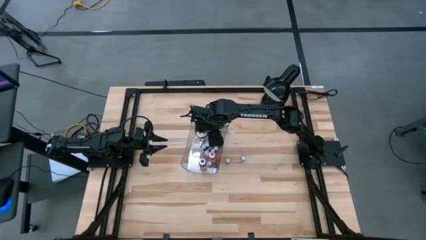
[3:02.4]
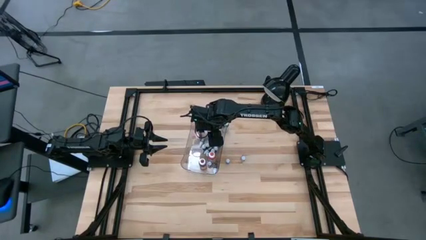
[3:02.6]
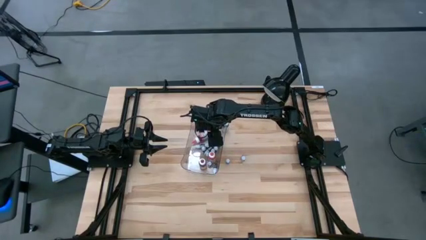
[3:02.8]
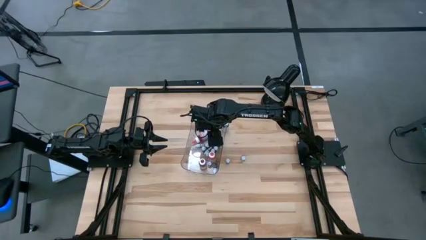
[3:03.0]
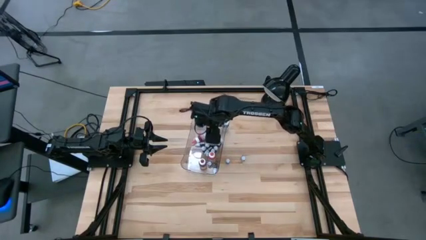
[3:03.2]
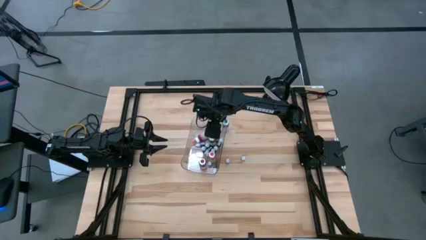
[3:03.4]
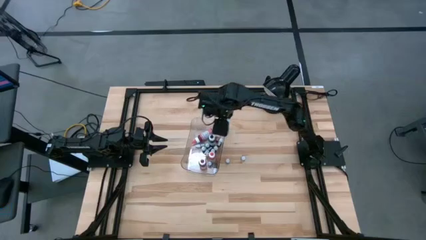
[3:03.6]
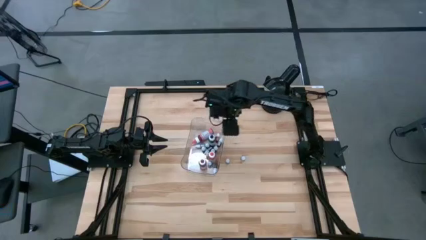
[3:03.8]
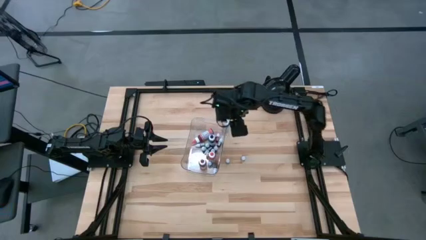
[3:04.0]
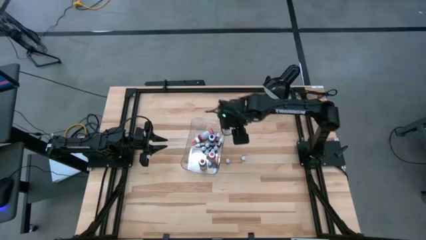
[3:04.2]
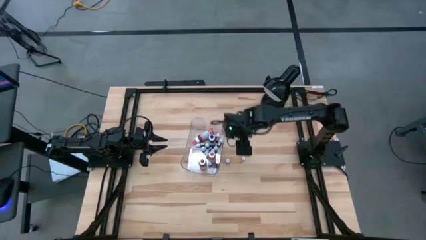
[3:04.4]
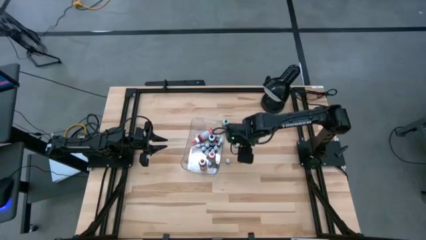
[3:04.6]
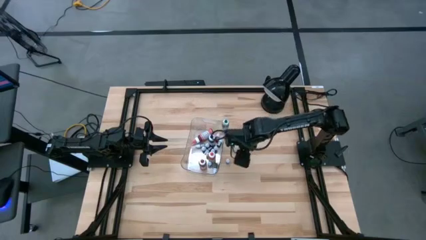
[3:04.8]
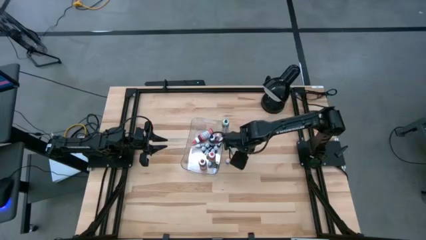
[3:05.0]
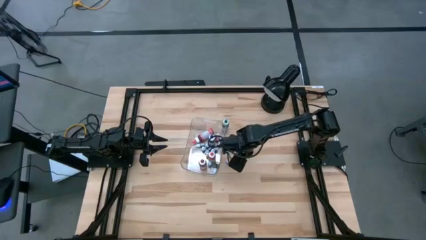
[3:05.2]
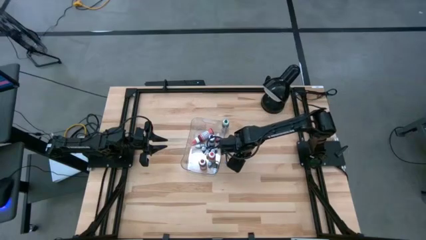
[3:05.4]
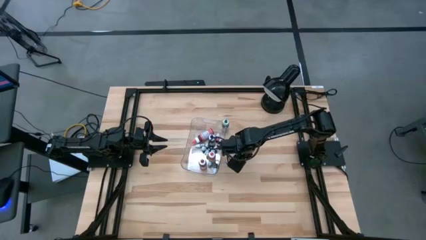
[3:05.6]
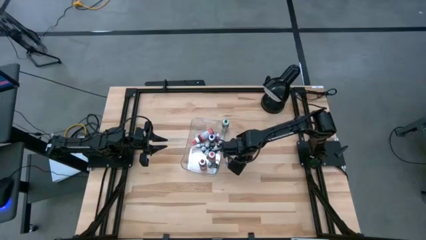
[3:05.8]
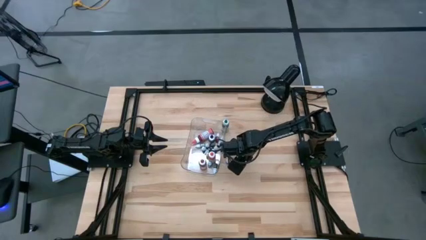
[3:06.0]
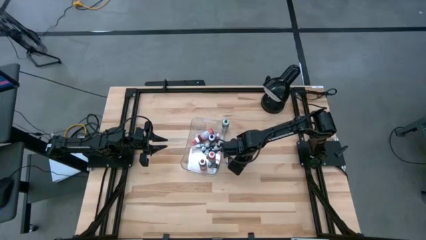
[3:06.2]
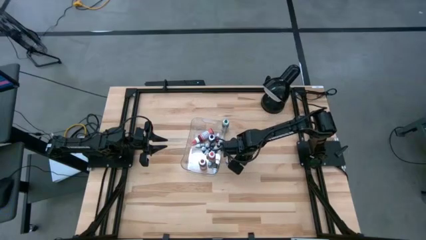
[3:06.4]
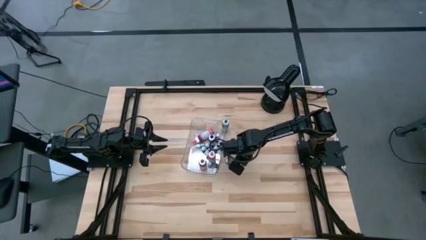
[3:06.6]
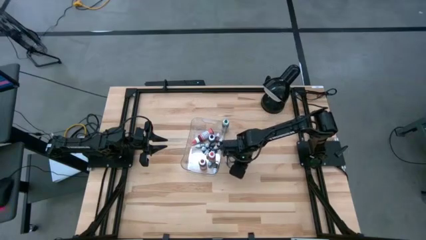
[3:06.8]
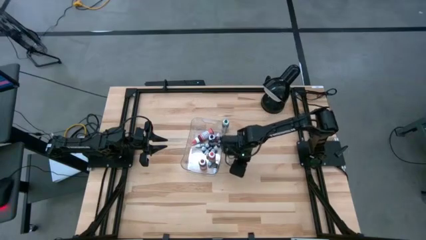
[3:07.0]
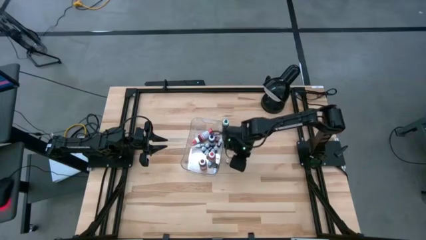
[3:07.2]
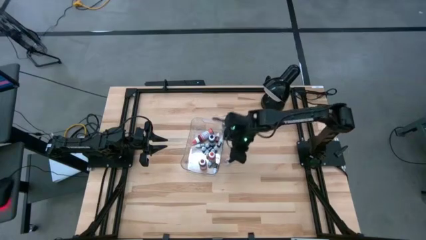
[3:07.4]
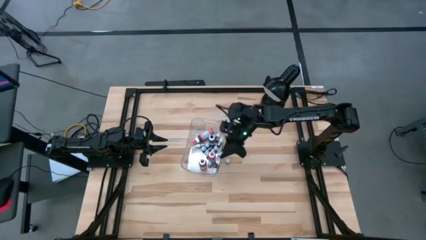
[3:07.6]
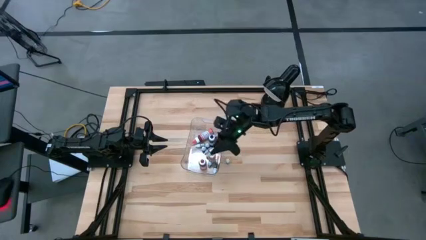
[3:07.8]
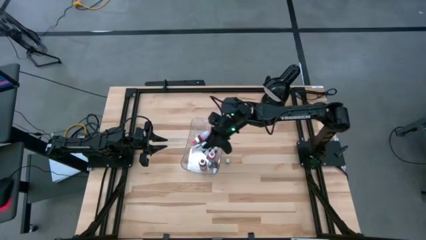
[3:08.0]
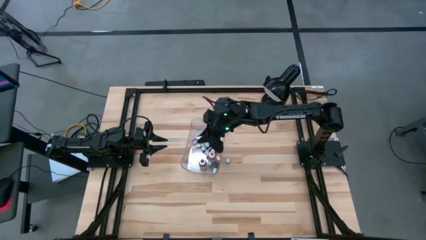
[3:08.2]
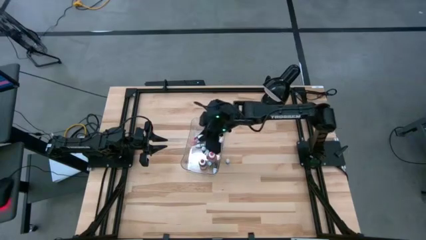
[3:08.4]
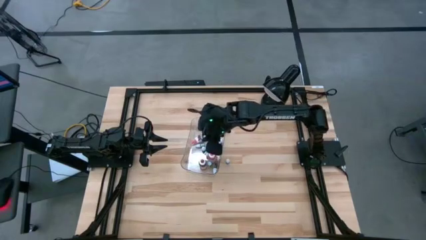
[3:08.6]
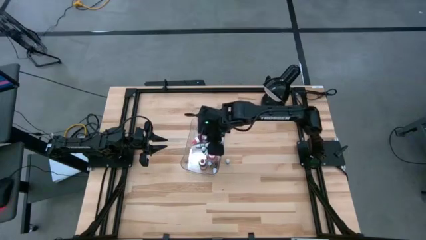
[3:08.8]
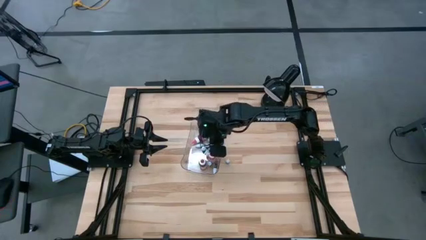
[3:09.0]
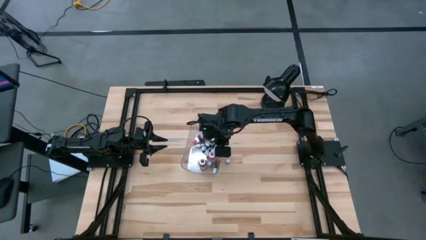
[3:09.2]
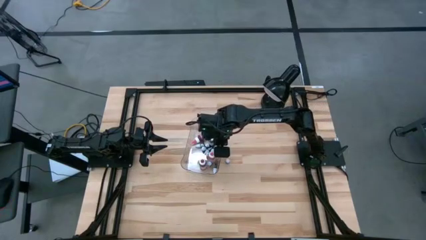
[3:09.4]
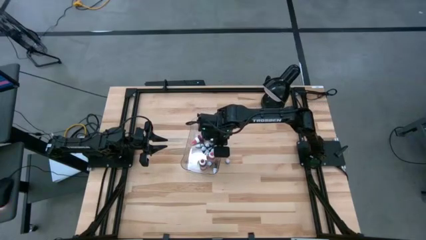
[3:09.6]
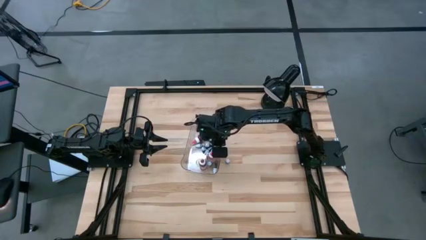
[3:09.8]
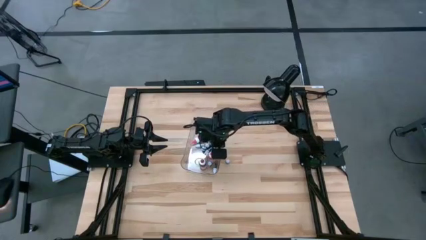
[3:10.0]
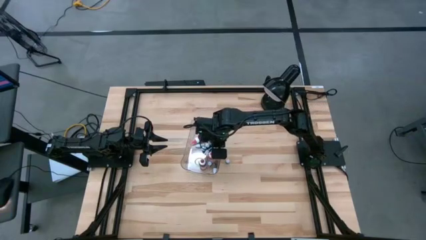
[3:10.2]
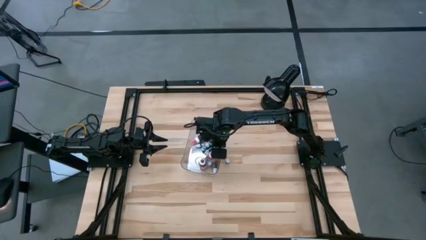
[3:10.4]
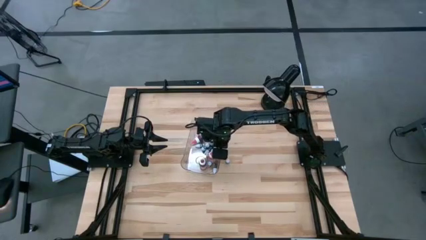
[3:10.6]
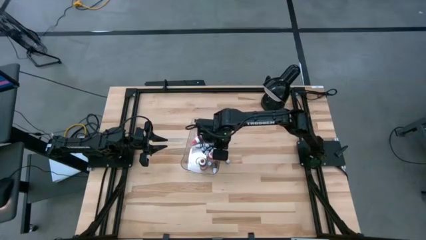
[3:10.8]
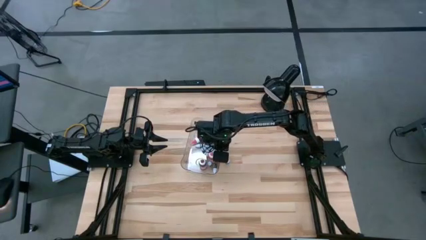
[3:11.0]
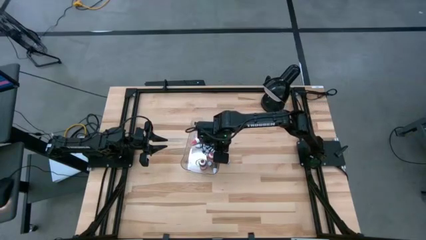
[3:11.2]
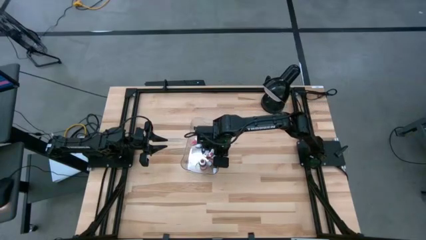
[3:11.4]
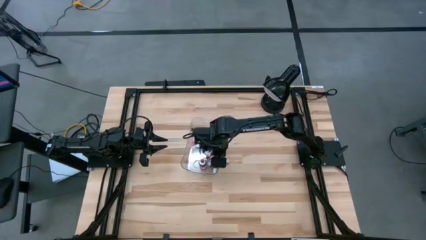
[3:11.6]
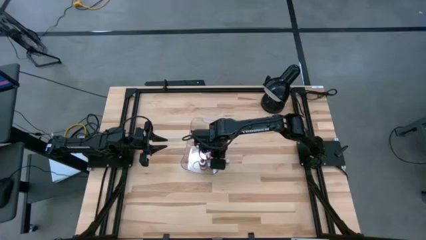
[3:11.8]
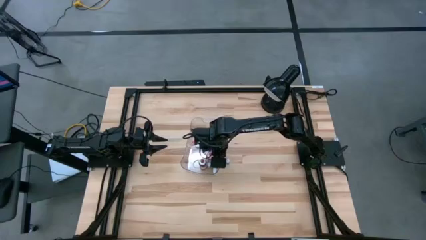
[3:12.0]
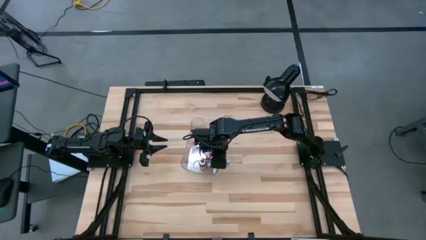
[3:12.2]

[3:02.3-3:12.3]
Task: Pick & Place food coloring
Put the small red food coloring bottle into the transparent bin

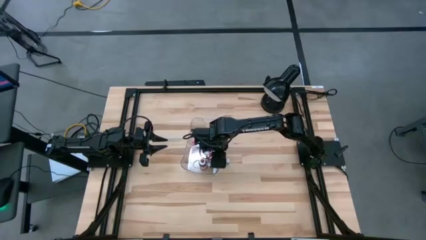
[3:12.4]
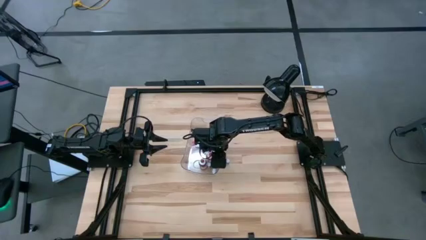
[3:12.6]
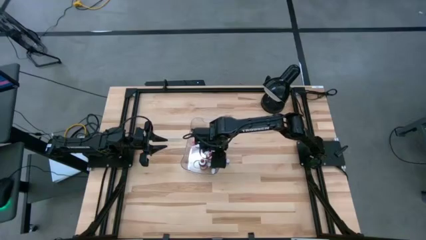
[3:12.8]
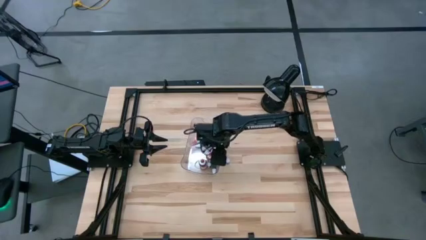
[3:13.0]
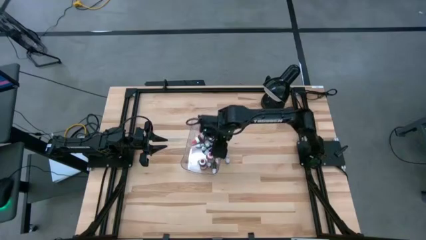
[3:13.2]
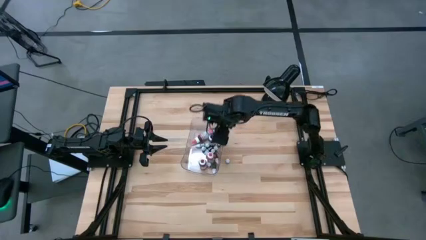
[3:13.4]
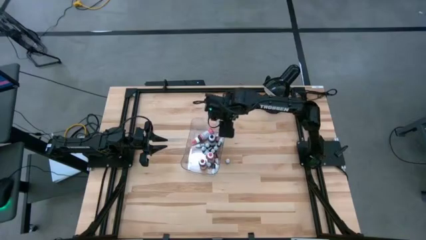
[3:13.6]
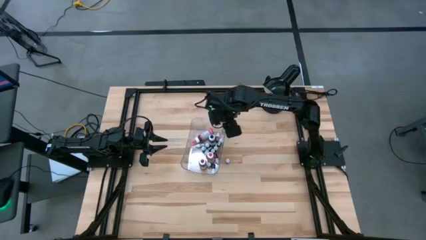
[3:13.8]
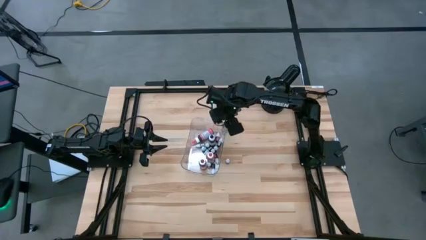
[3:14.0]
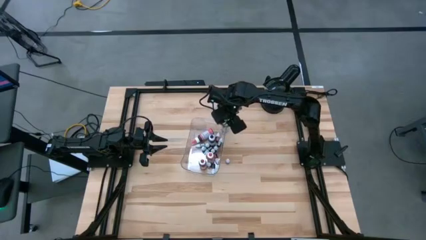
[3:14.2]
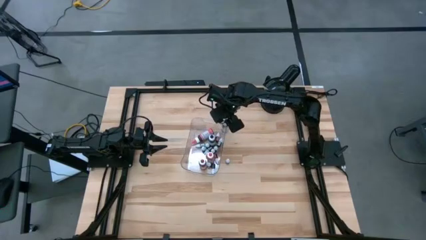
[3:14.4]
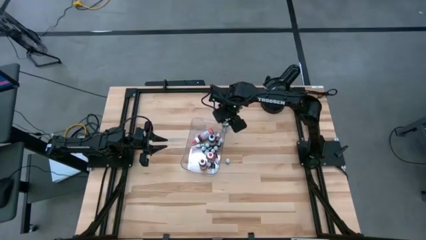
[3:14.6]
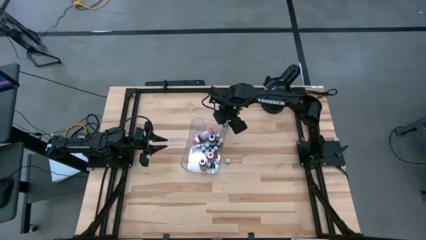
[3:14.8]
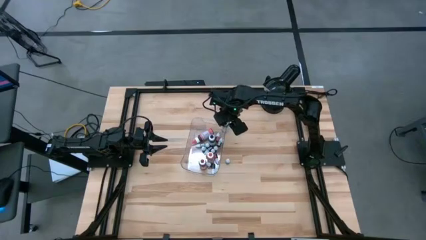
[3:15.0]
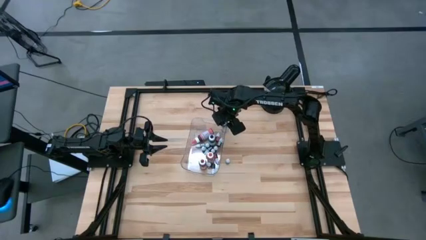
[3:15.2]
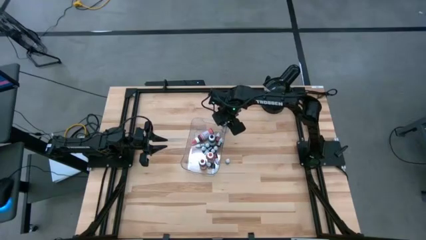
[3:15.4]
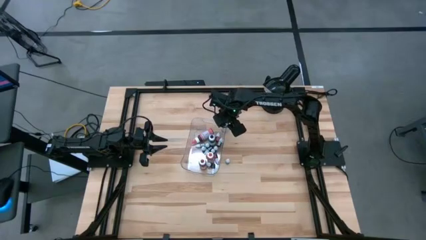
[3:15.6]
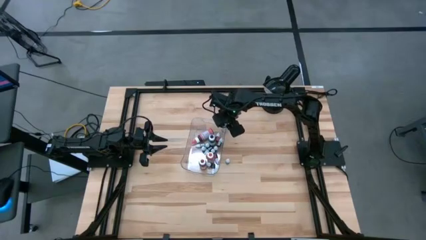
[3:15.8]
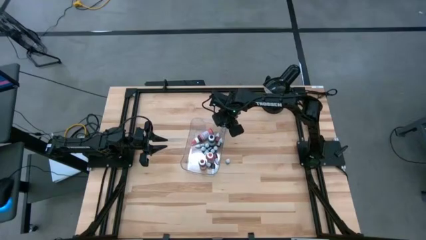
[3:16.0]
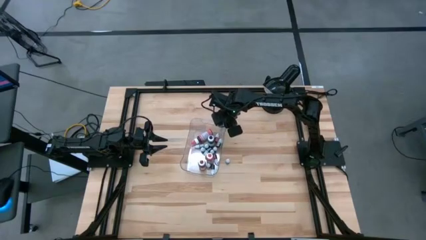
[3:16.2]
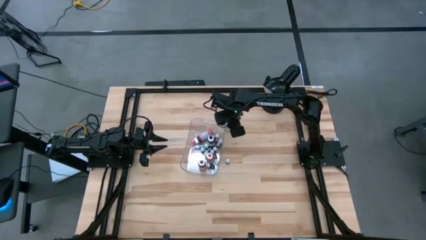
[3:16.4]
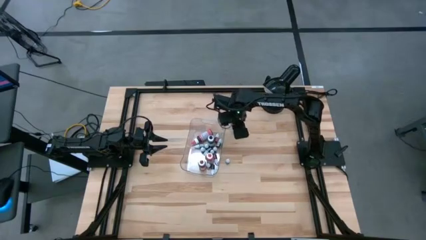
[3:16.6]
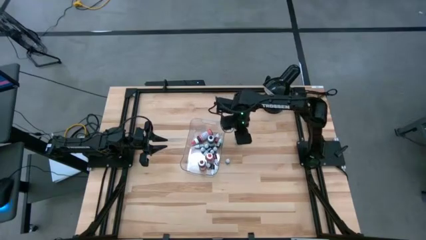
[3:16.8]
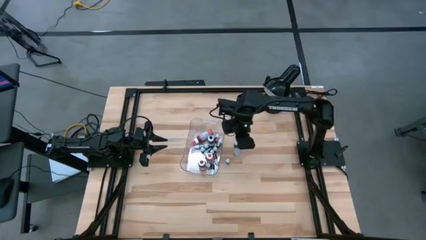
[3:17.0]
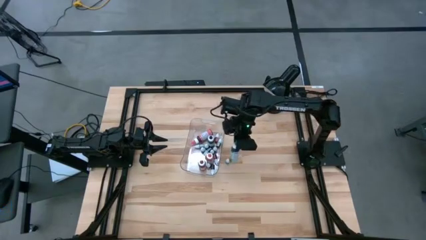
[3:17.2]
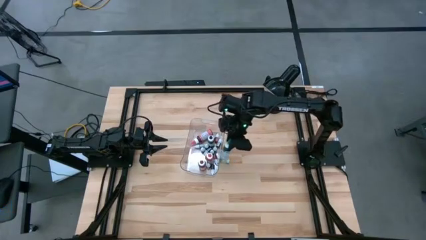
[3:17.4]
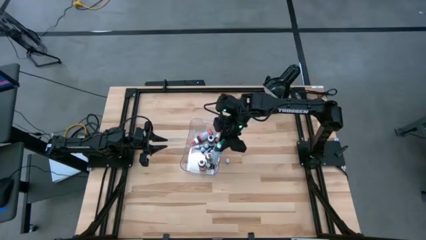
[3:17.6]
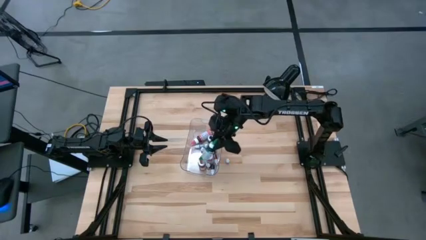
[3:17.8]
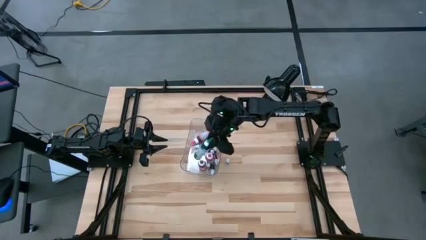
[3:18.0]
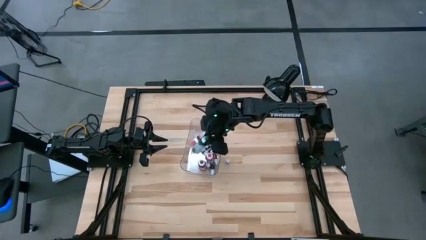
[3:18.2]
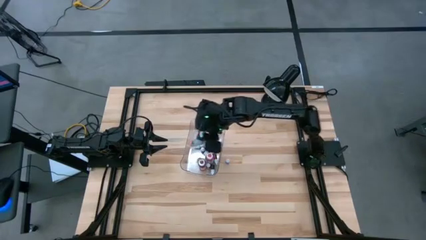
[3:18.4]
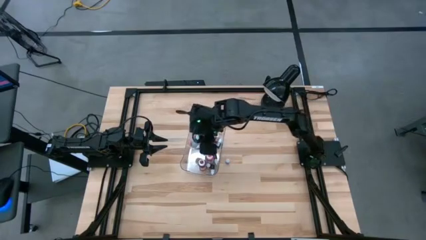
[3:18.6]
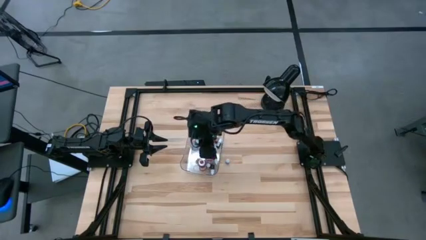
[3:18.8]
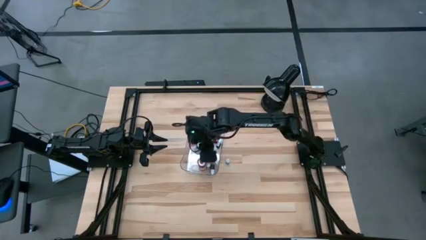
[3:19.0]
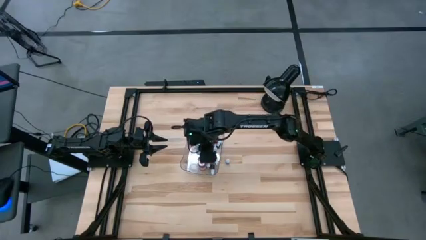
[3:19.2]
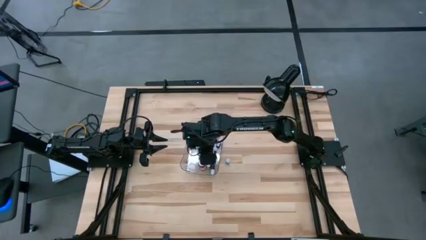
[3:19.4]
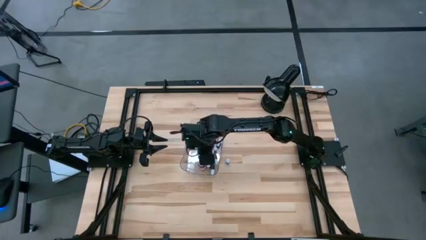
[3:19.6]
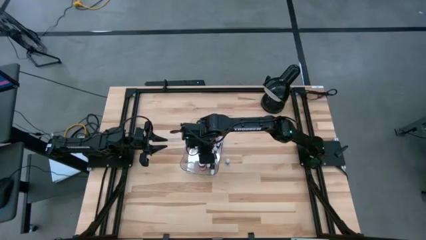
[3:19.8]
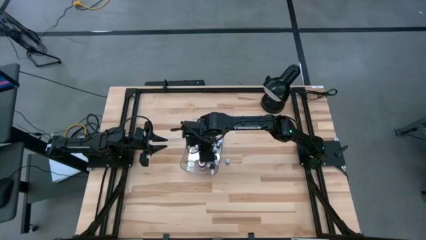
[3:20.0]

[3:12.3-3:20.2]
Put the large green food coloring bottle into the transparent bin
